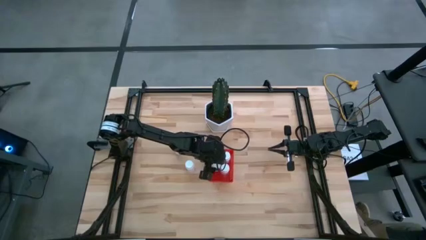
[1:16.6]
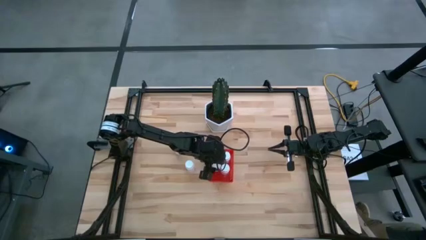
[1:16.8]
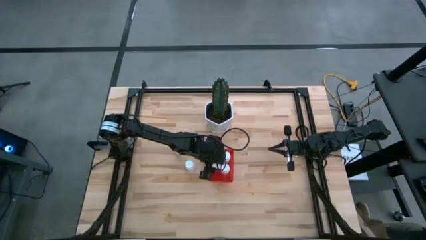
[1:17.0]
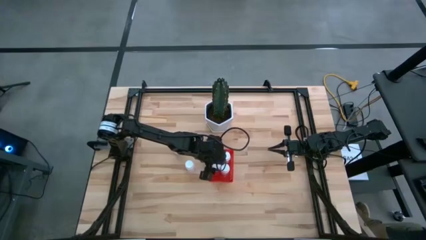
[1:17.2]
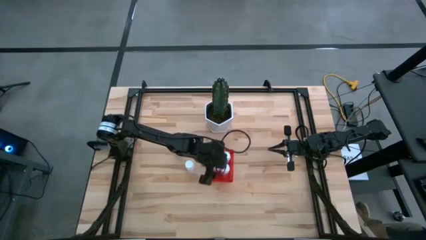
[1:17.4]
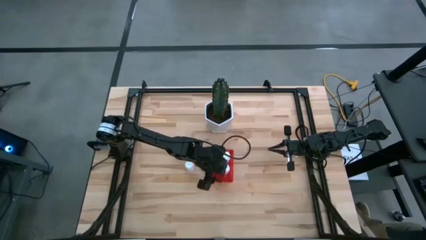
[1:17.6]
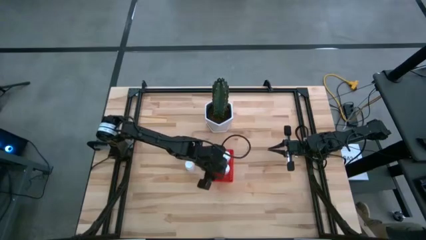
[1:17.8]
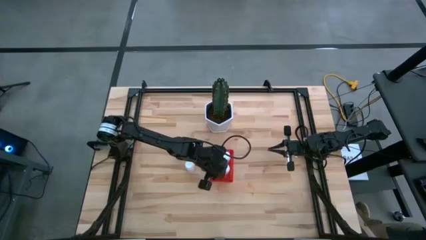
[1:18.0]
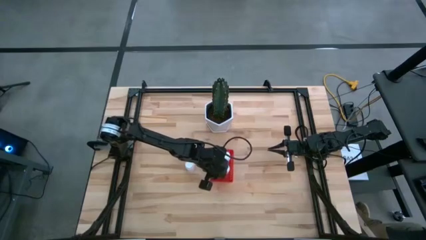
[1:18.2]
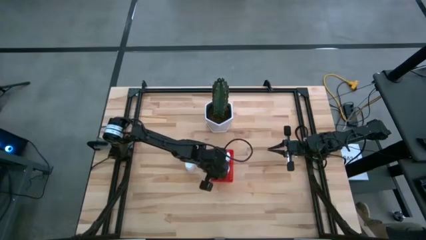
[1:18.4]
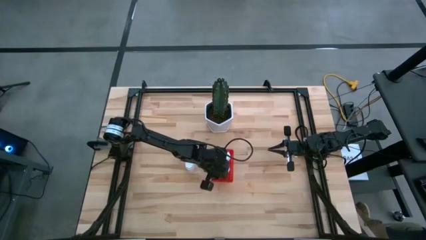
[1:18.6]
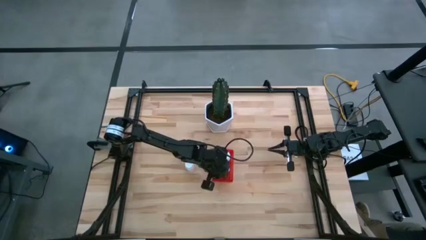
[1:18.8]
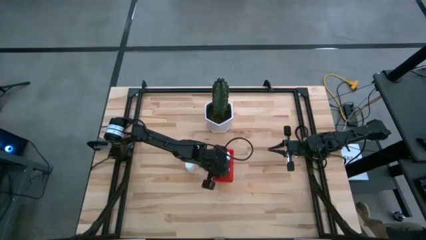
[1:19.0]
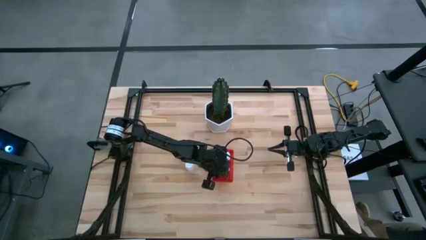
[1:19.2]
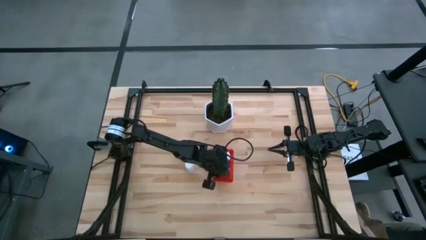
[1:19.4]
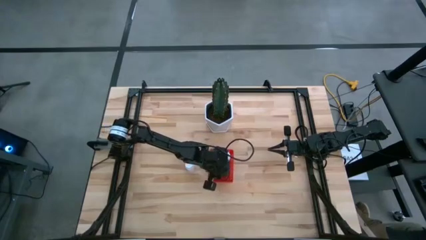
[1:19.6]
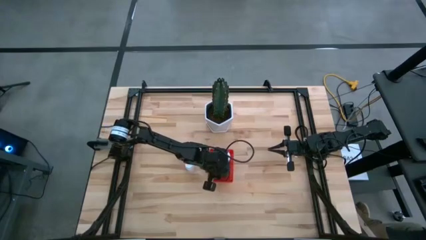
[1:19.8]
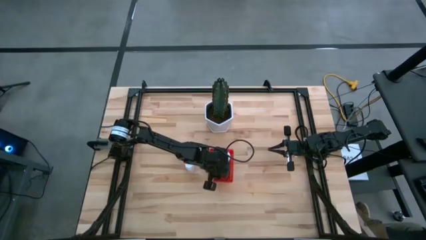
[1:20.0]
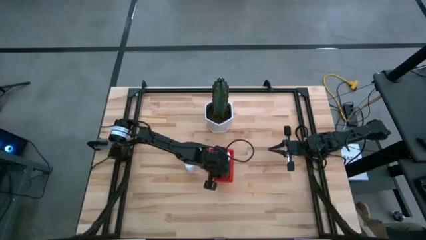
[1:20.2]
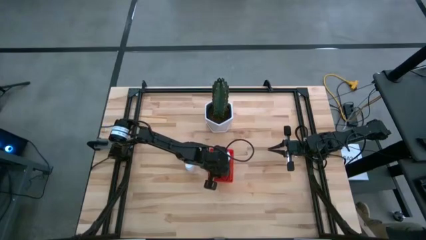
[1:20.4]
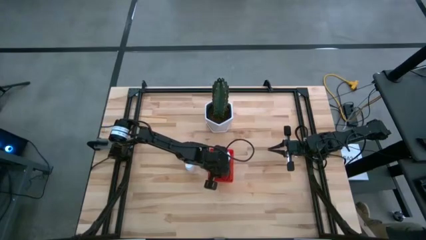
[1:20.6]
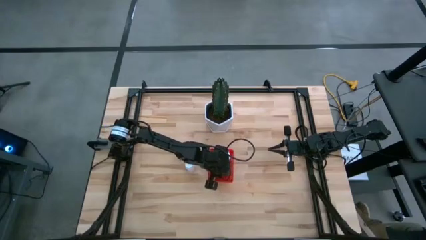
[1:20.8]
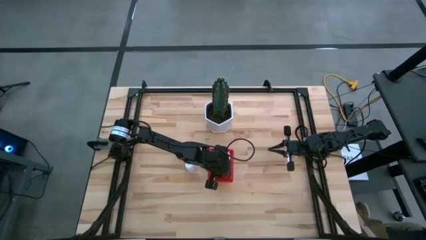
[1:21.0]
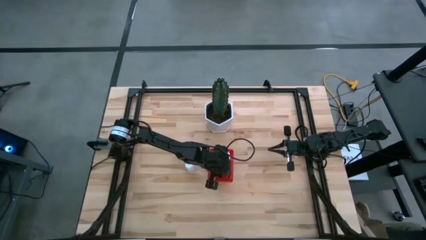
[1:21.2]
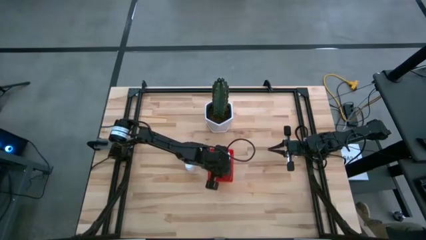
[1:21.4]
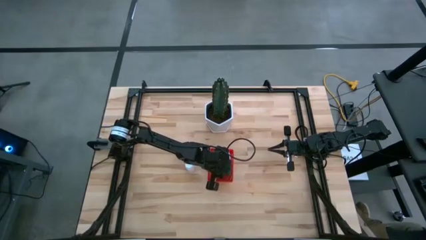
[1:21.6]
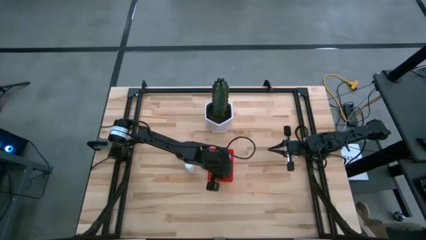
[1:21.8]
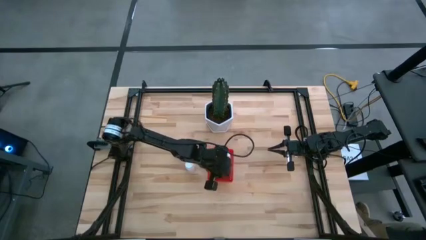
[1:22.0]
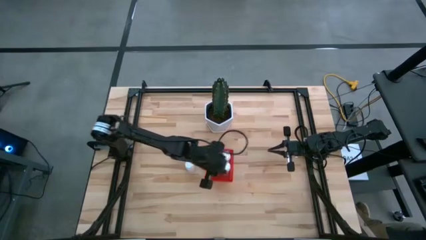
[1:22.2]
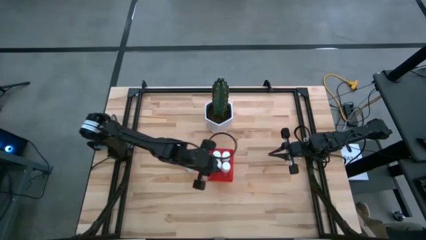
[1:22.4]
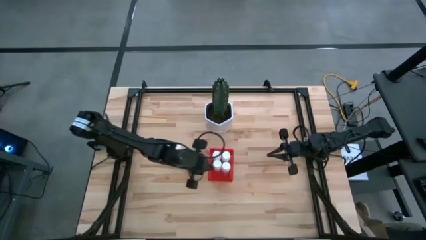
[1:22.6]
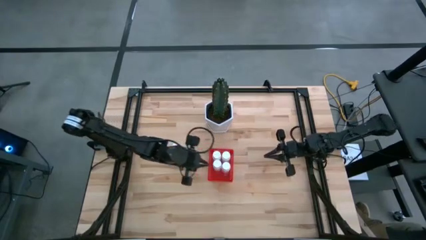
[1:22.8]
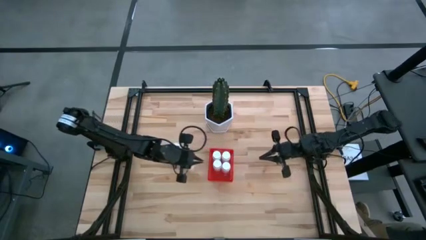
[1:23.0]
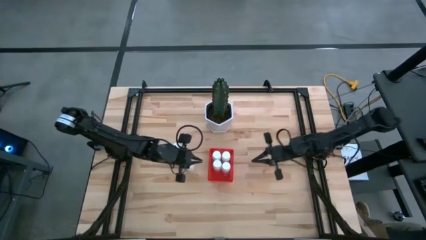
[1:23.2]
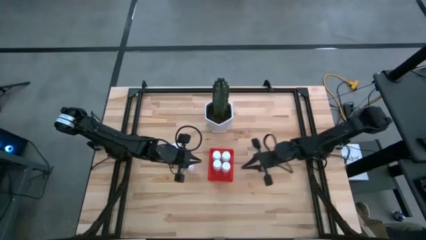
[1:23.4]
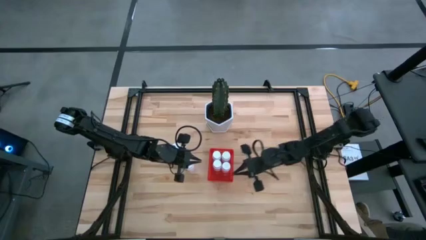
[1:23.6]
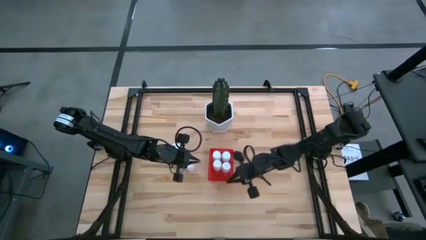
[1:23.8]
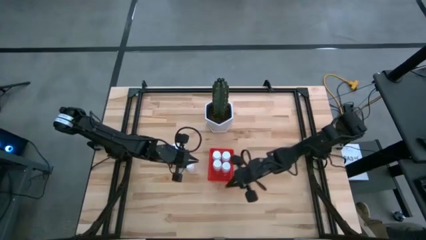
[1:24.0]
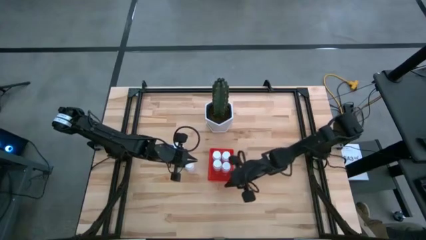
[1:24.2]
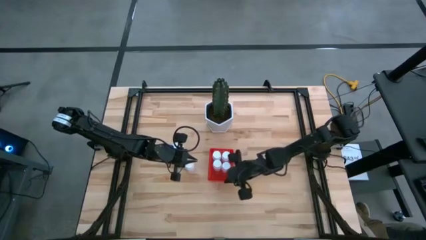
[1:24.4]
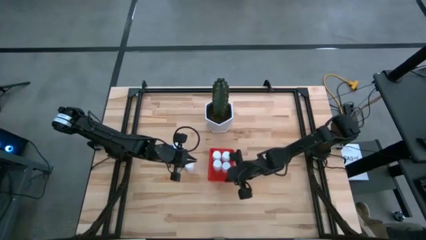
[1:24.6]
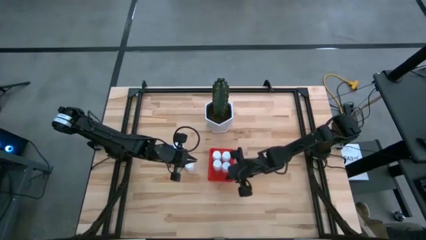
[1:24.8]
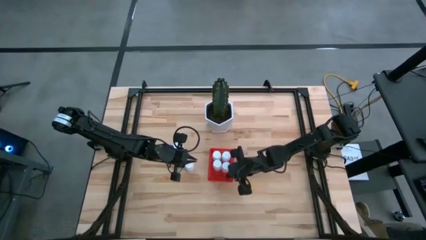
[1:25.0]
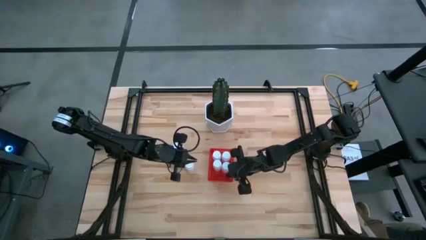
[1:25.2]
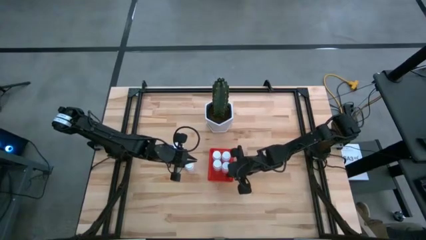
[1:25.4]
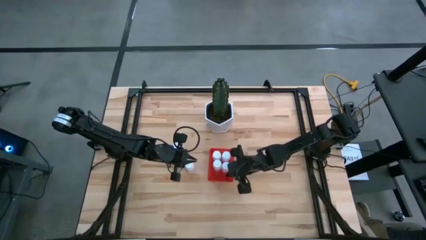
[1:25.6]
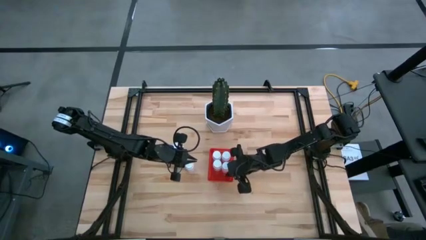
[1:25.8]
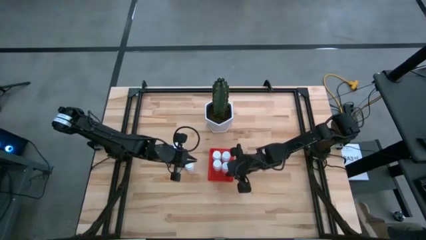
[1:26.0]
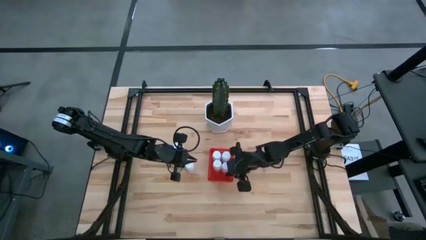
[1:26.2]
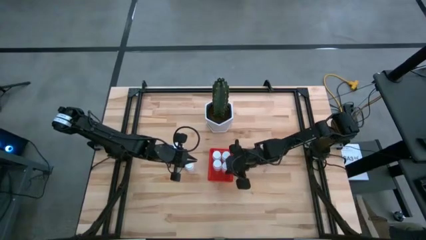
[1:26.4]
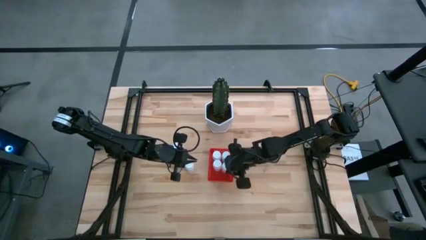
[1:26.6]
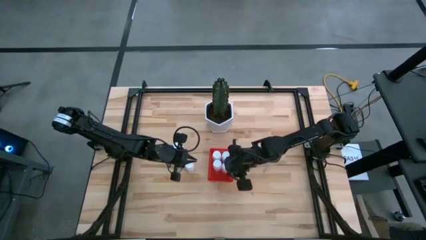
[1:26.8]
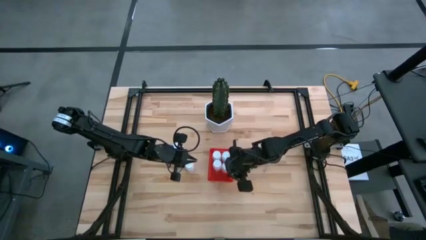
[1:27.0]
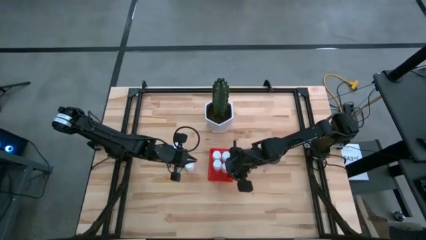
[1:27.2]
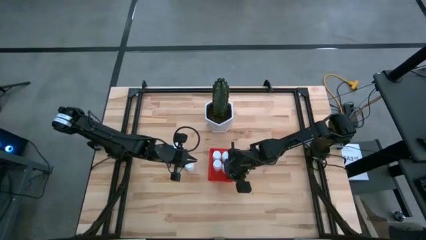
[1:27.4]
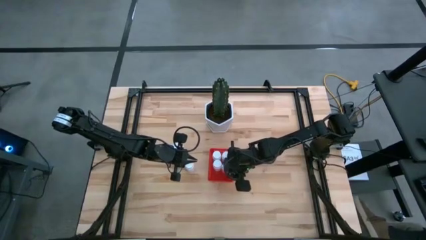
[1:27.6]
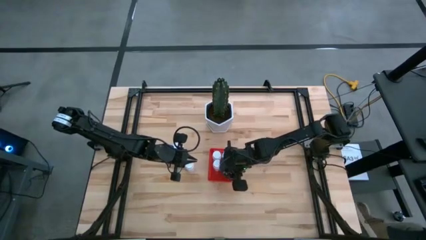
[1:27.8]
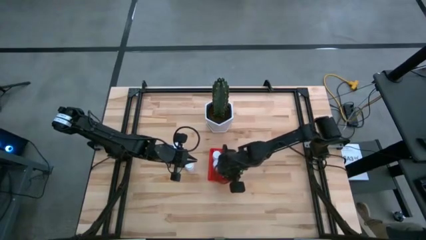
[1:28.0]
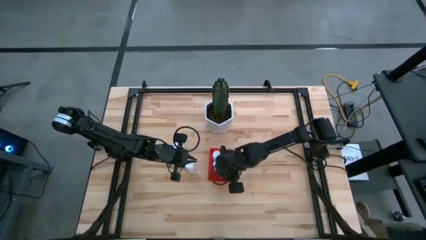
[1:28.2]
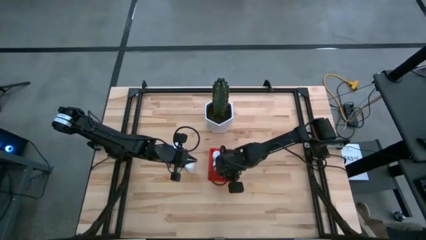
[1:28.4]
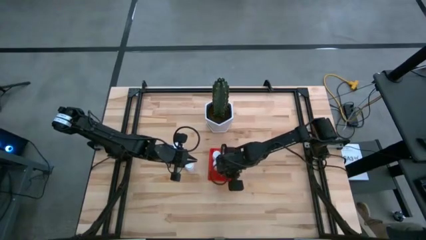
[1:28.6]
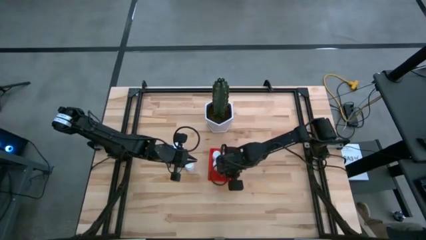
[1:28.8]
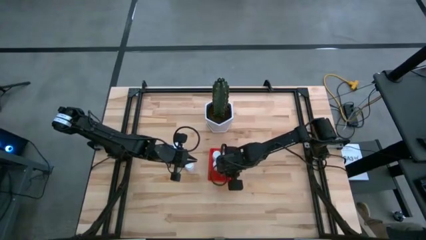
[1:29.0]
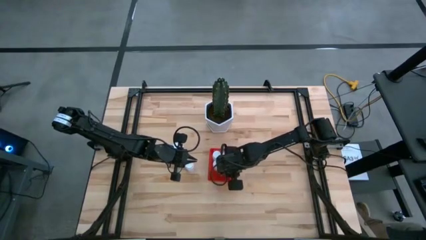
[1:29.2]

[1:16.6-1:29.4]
Task: Pick and place pill bottles into a basket
Adjust the white pill bottle in the red bin

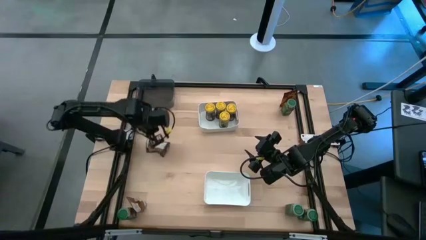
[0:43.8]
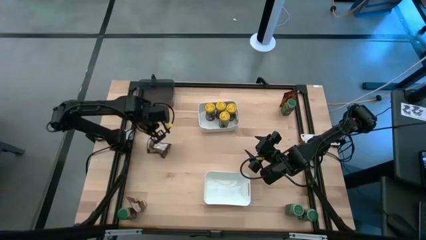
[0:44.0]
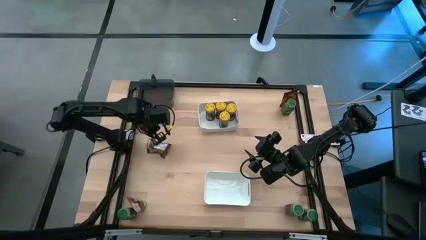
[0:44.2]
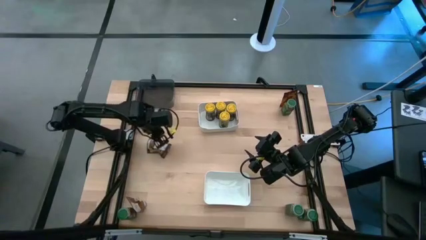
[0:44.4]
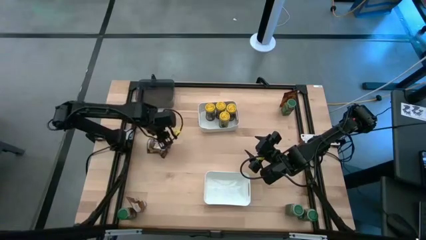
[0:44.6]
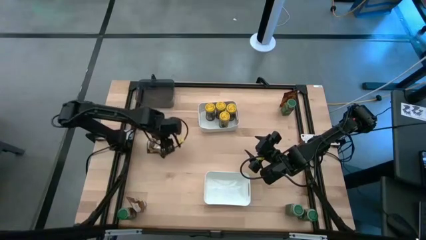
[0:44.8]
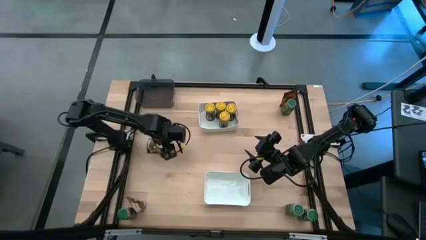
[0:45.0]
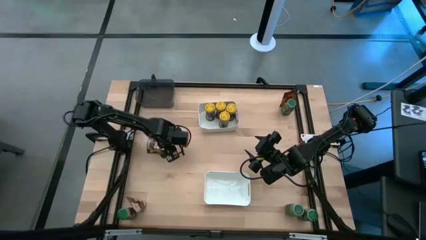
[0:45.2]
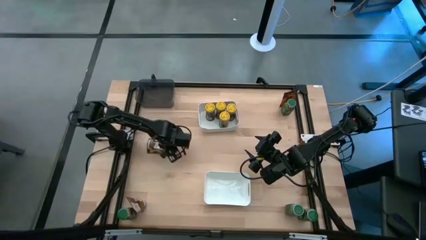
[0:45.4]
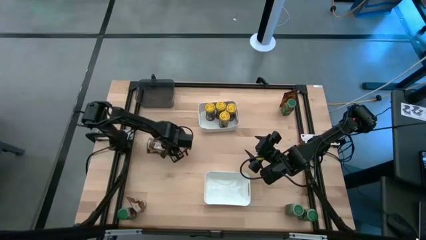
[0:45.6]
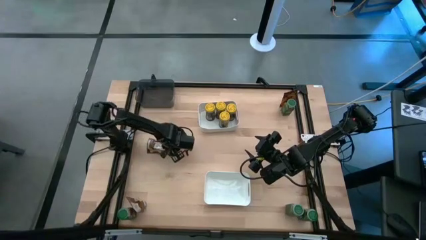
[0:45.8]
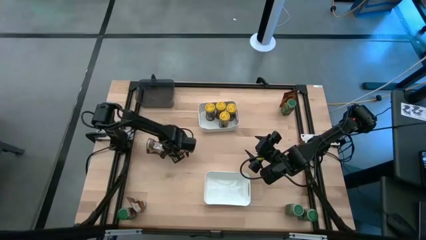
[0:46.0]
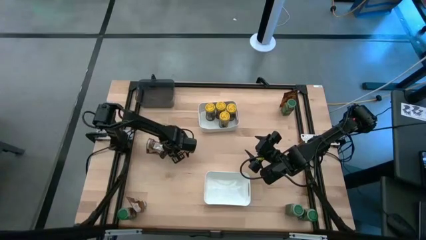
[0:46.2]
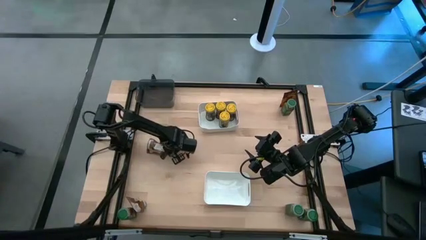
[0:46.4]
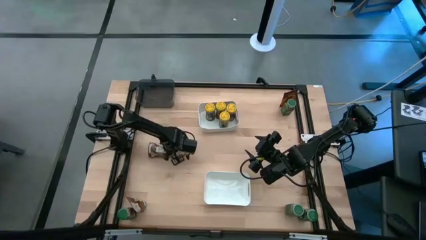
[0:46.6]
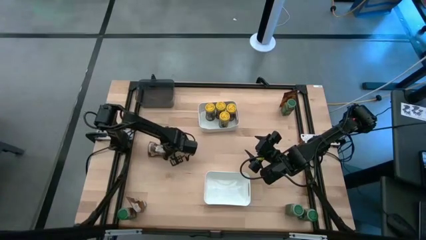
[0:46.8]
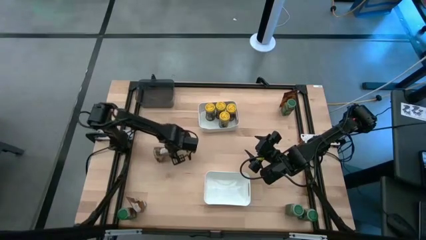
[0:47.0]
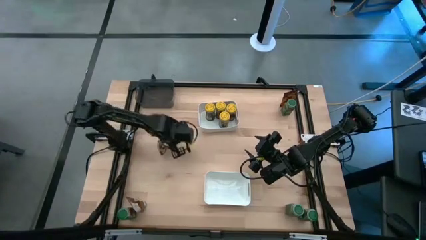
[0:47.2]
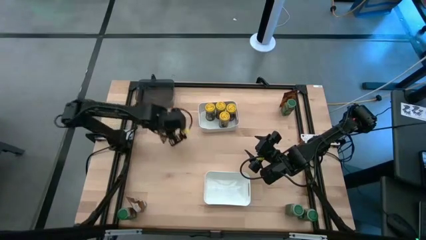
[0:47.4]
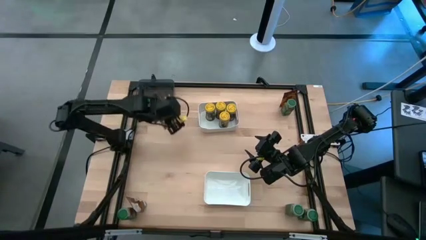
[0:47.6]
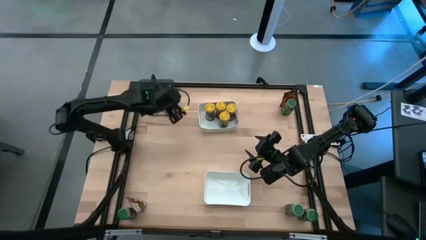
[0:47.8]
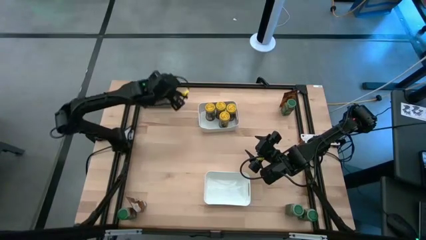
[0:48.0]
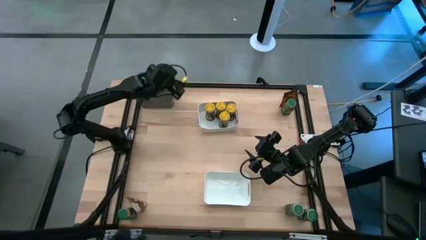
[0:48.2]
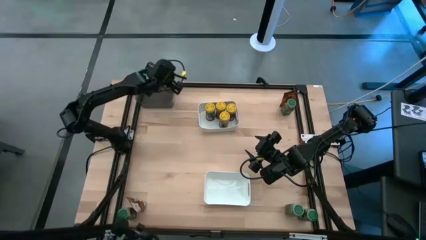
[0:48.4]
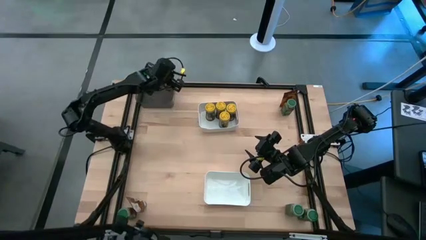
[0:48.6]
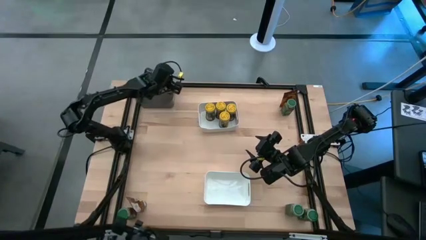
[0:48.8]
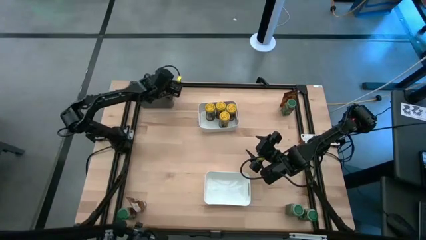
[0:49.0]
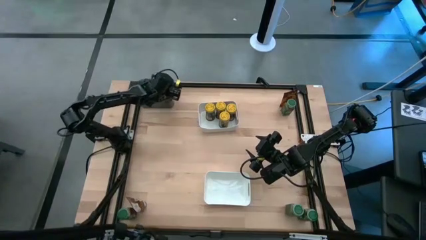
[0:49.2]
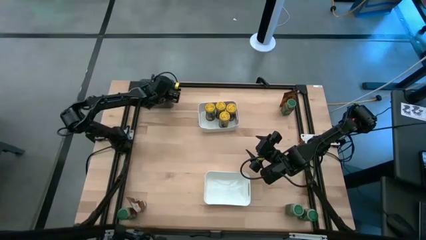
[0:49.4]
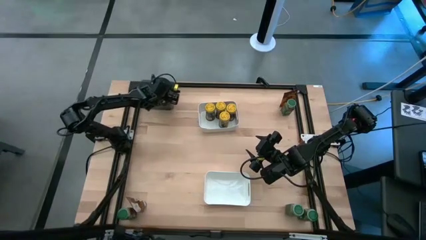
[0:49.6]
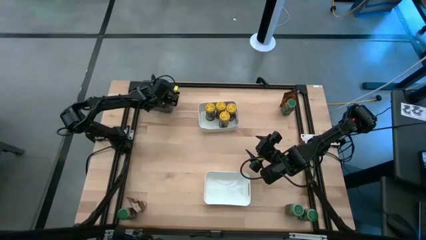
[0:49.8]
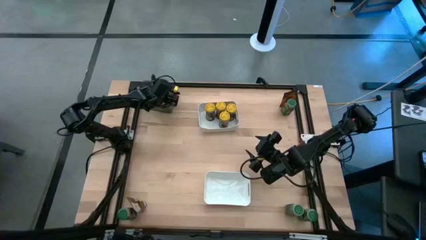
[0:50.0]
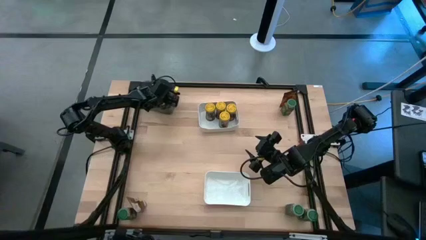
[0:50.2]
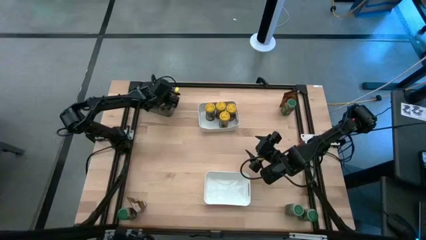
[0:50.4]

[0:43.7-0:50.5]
Task: Sort spices by type
Put the orange seasoning pack into the black bin
